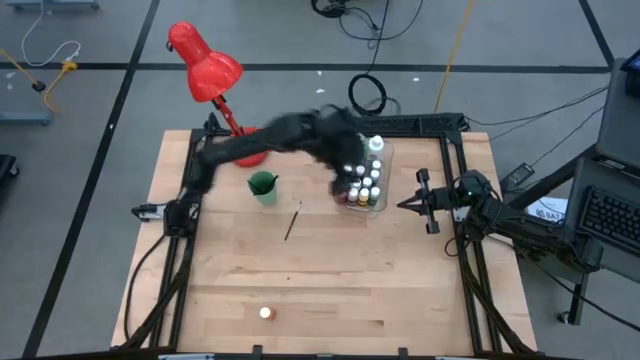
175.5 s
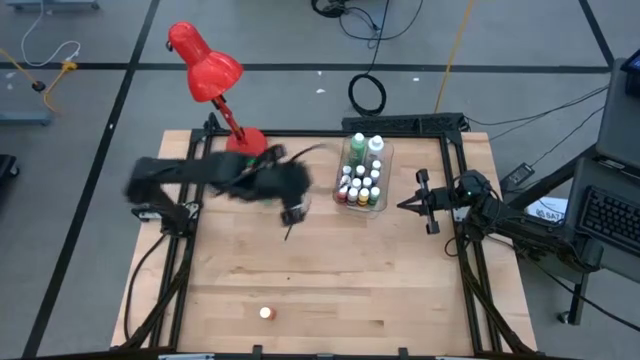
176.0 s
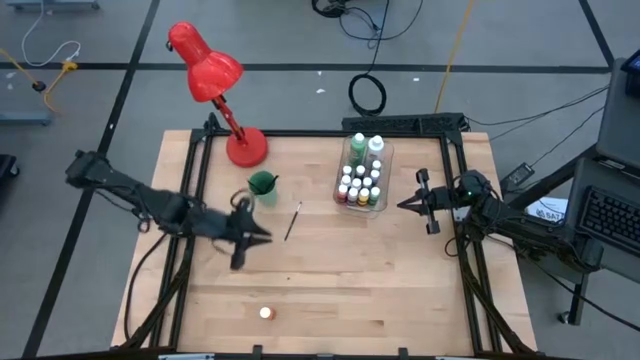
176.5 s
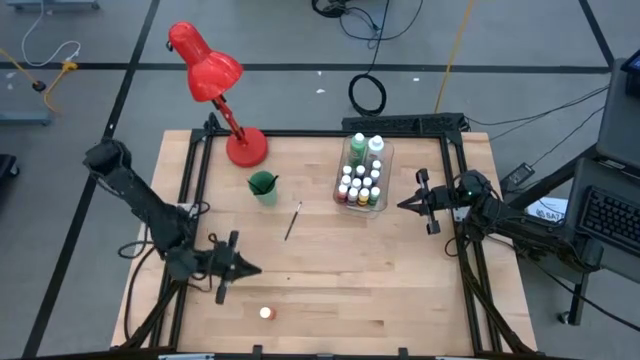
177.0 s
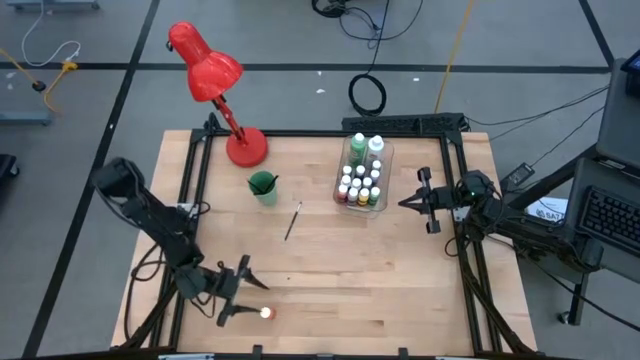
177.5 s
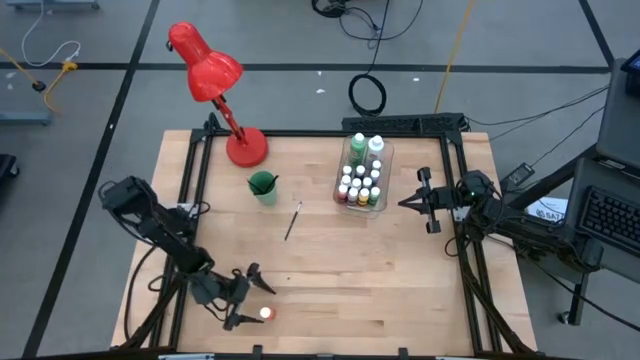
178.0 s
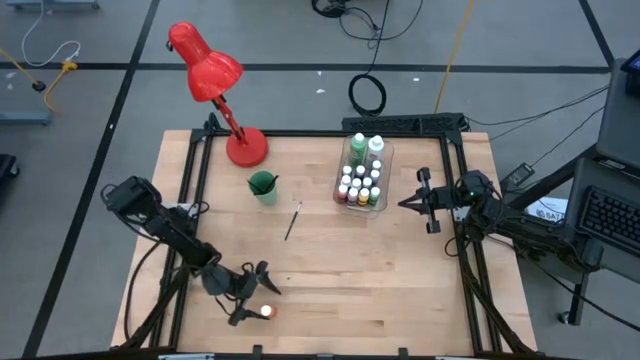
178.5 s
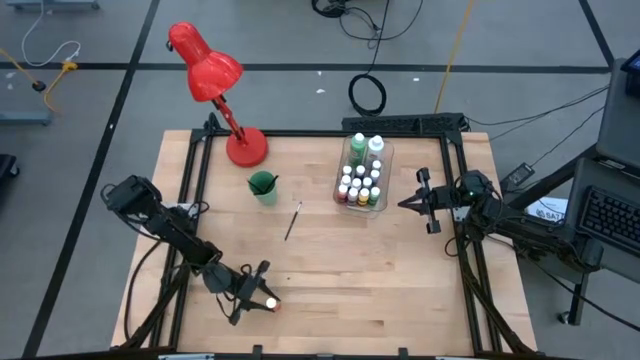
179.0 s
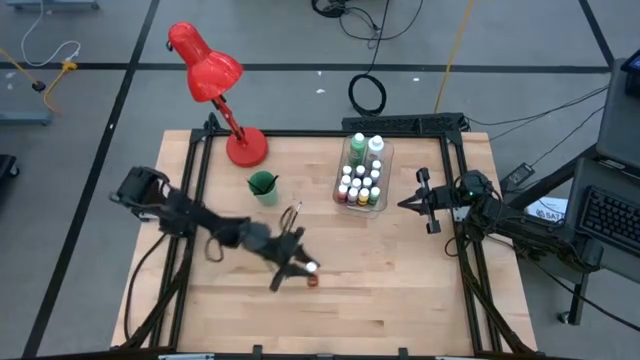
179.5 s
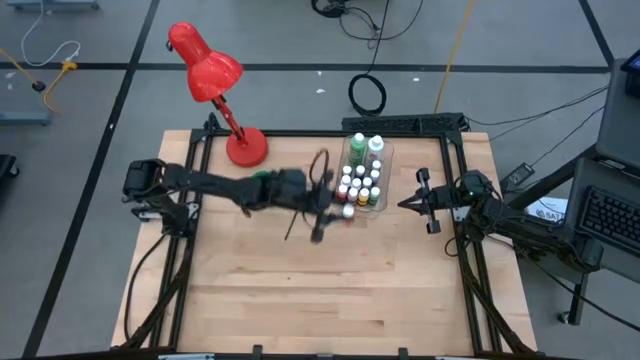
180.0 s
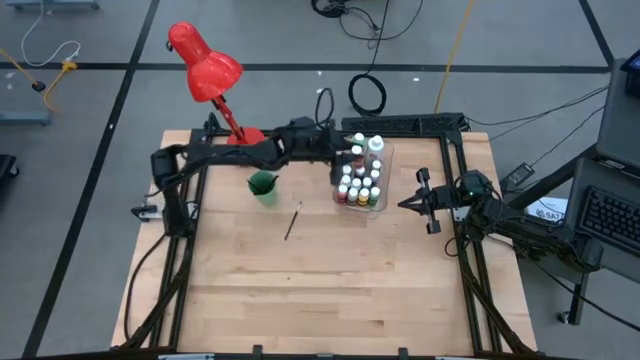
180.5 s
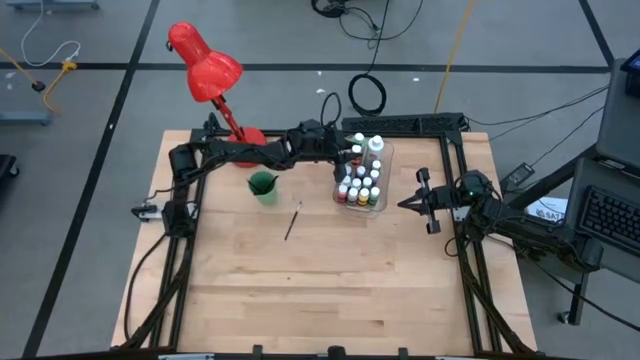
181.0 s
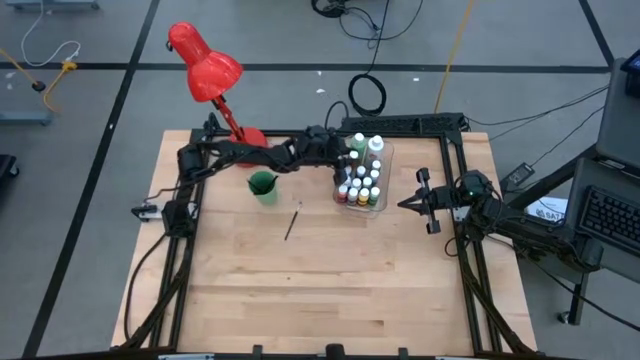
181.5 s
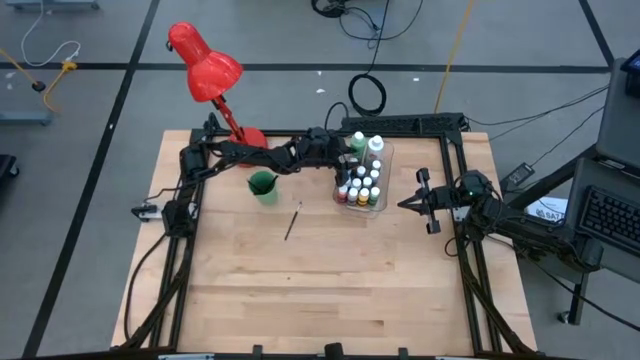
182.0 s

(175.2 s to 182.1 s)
Task: Pick & Place Paint Supplies
Put the small orange paint bottle into the transparent bin

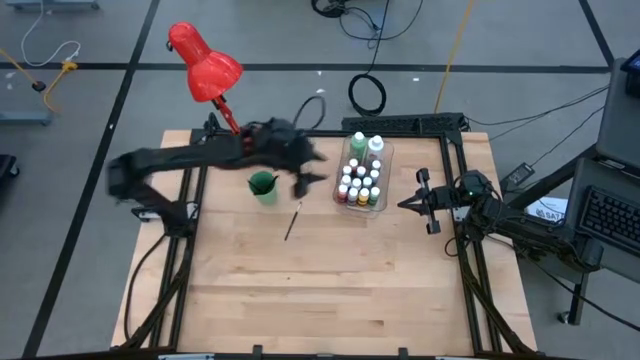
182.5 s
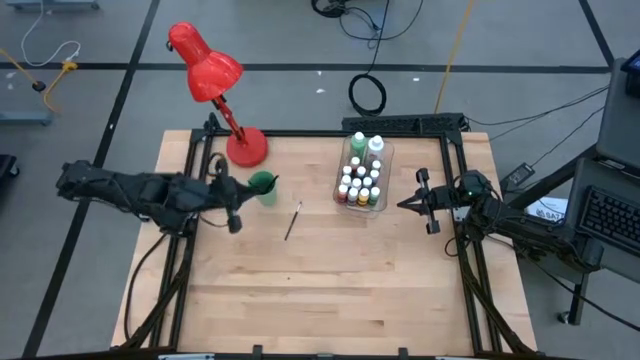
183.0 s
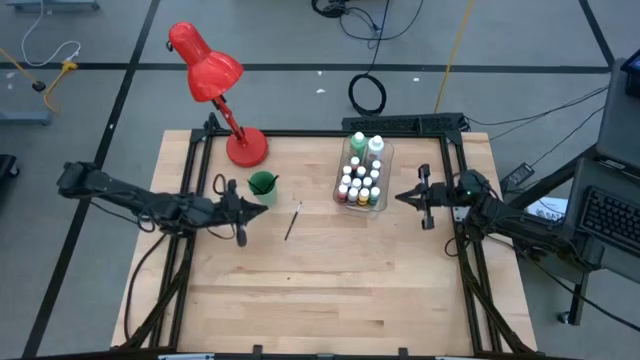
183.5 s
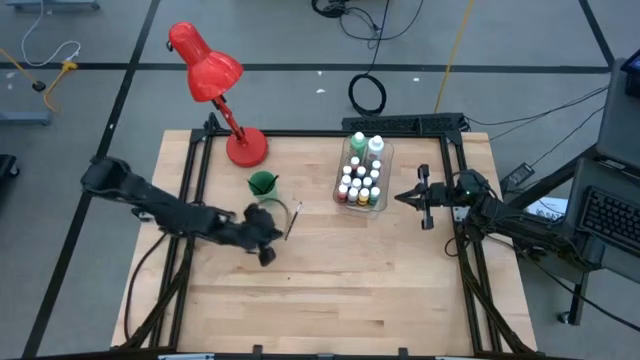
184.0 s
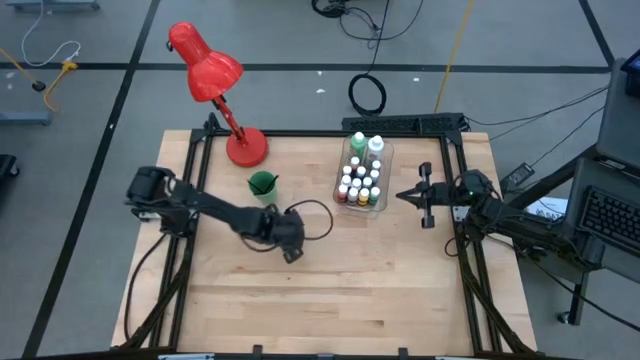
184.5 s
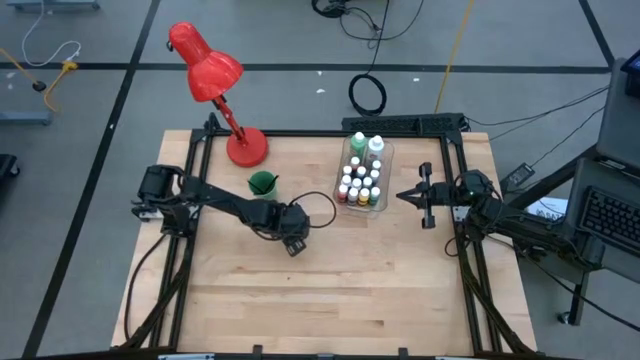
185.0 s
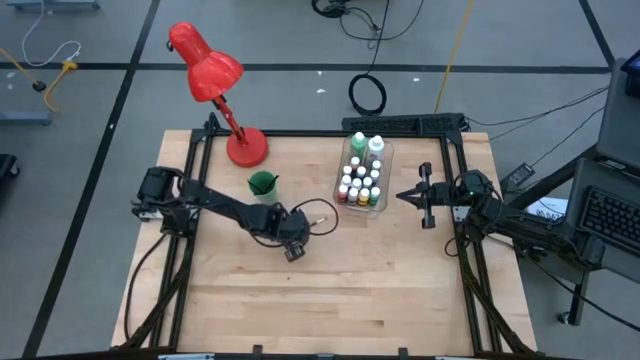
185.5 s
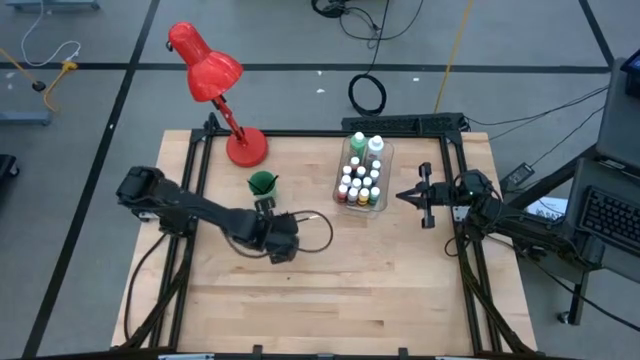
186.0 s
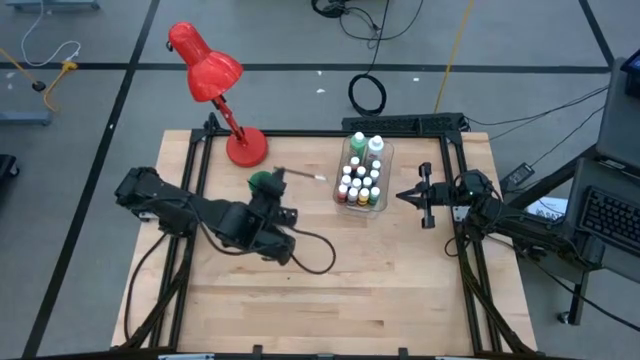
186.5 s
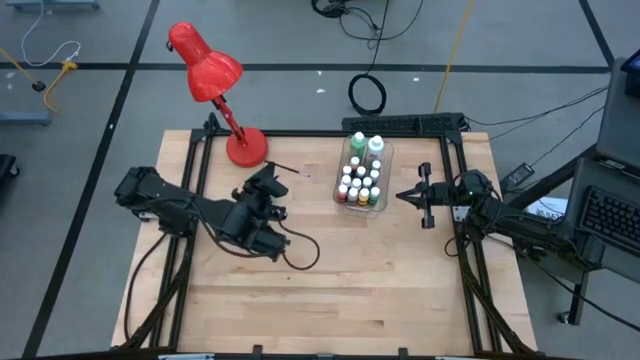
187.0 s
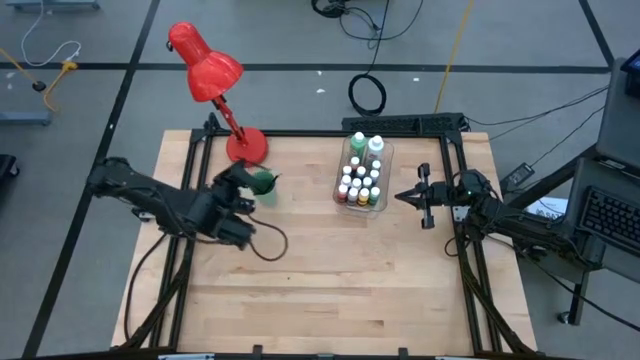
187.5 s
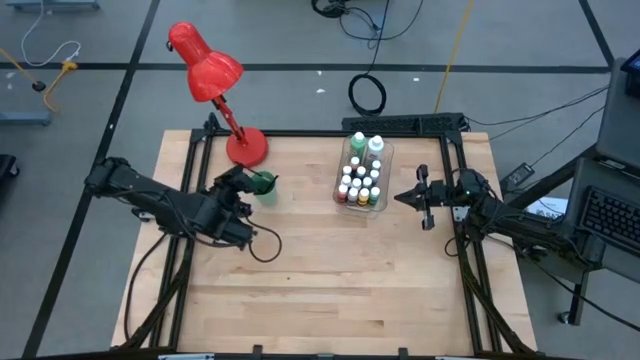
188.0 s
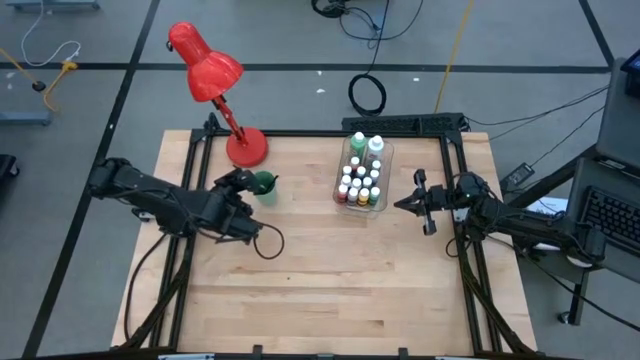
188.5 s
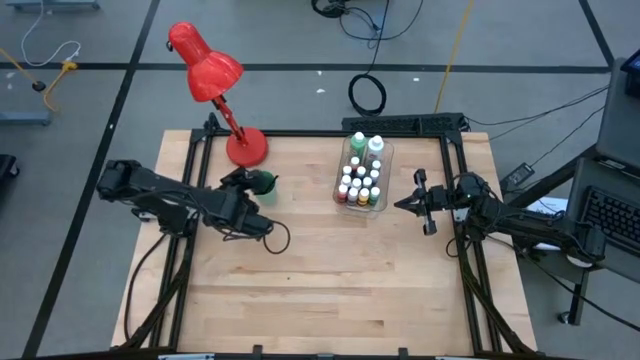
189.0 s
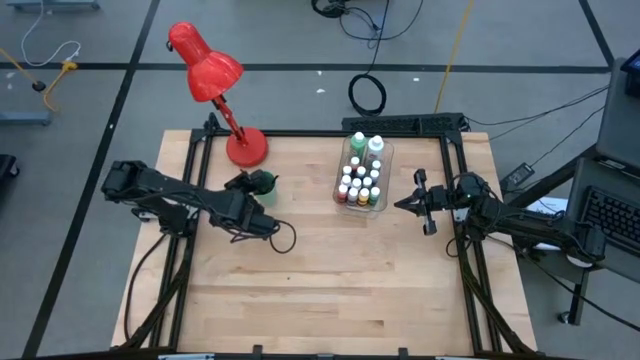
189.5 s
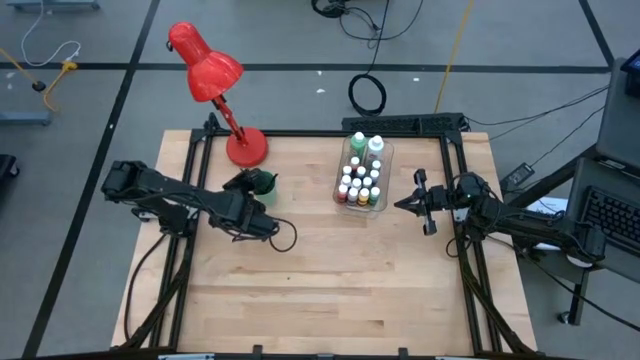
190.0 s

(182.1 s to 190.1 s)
Put the silver paintbrush into the green cup

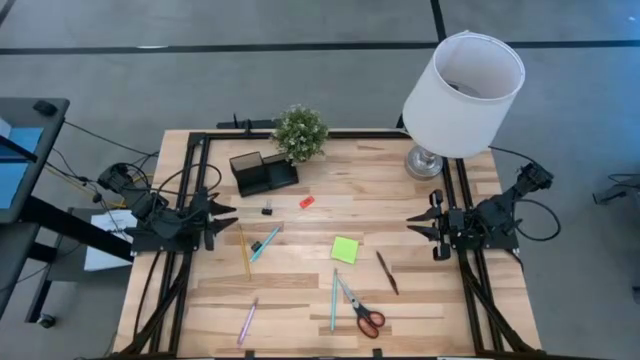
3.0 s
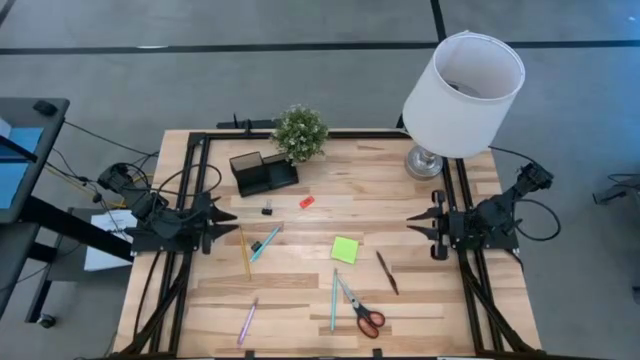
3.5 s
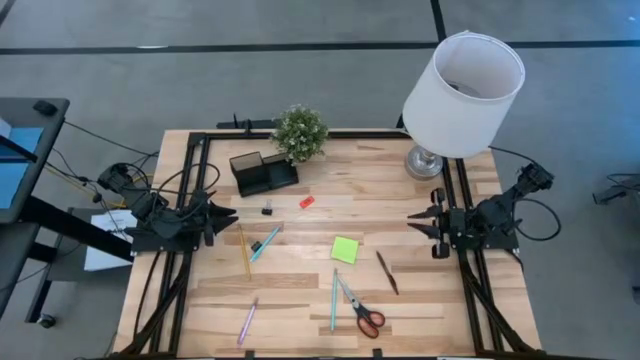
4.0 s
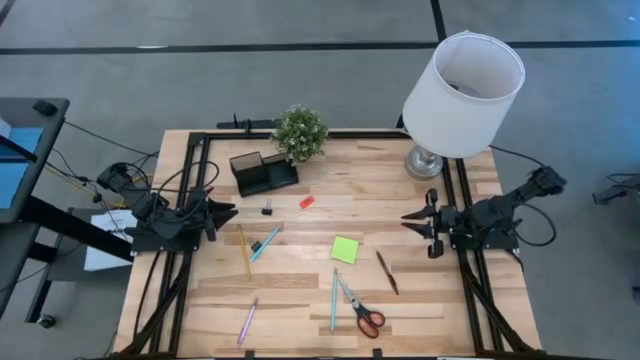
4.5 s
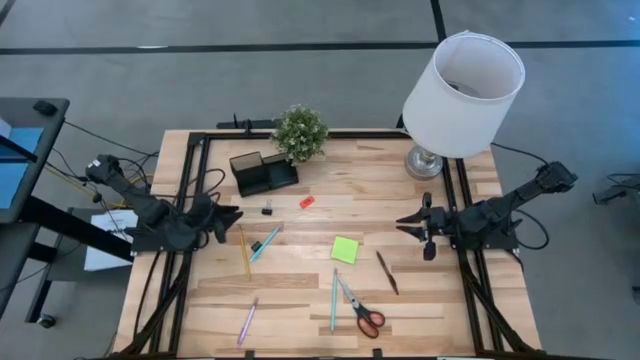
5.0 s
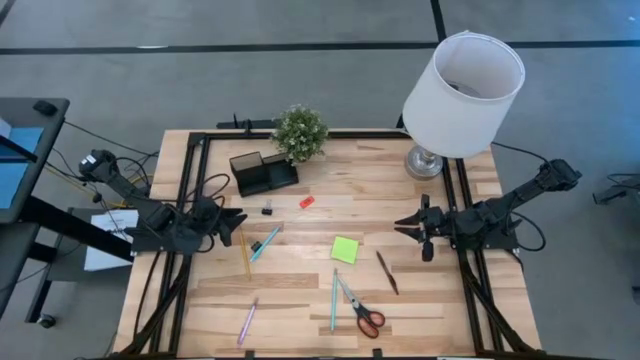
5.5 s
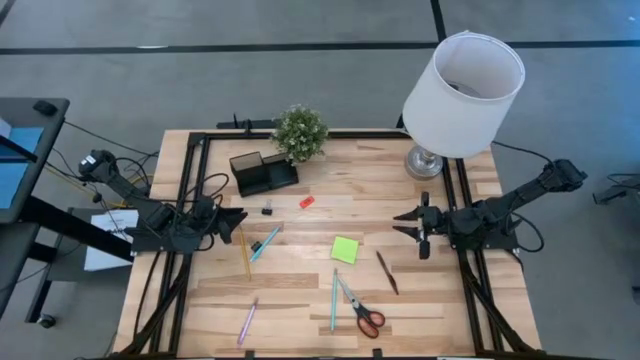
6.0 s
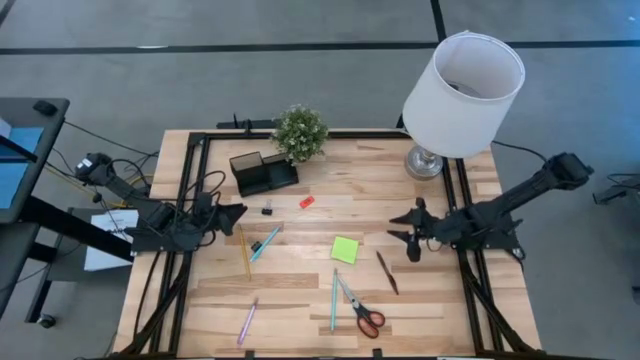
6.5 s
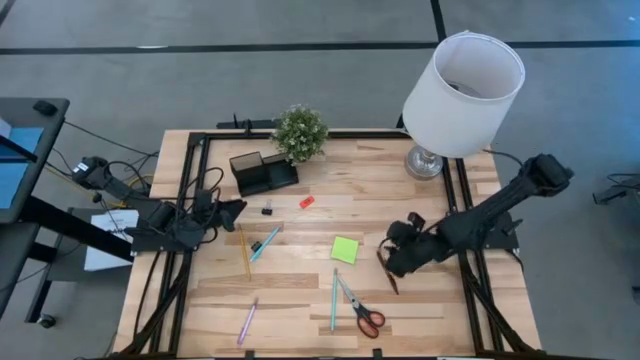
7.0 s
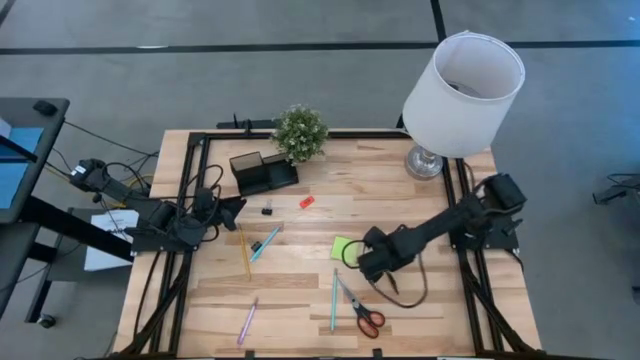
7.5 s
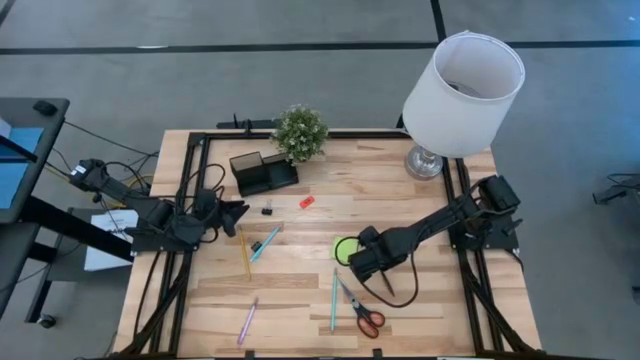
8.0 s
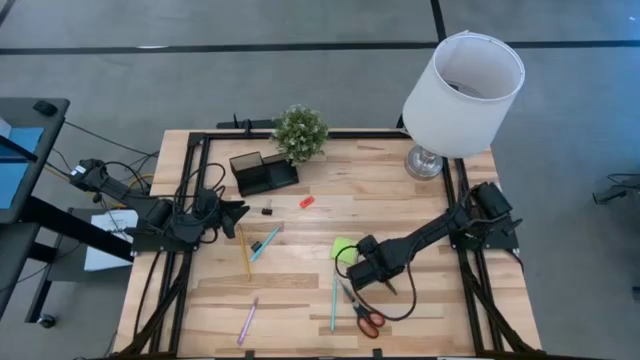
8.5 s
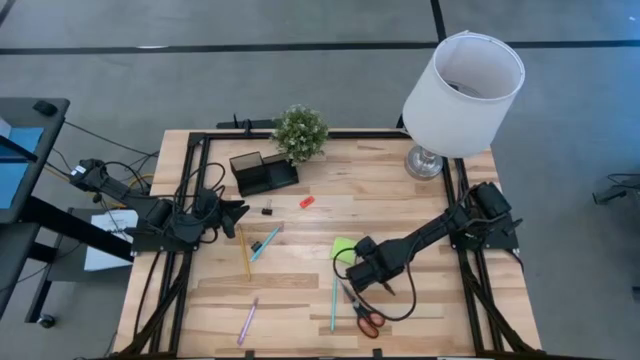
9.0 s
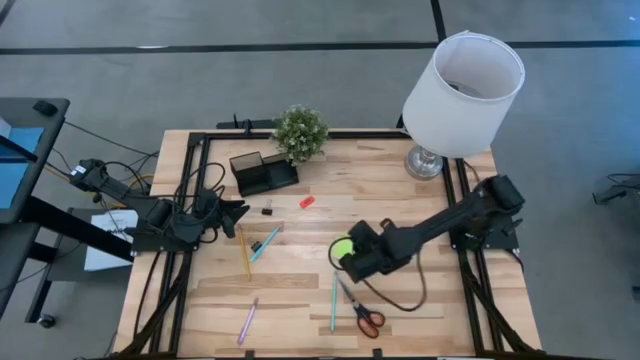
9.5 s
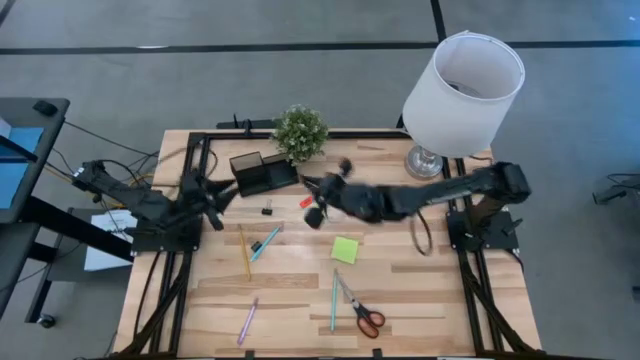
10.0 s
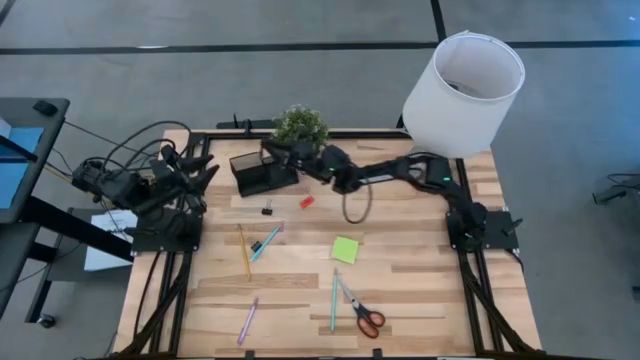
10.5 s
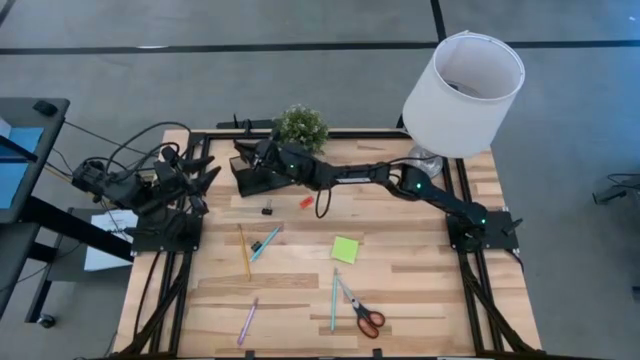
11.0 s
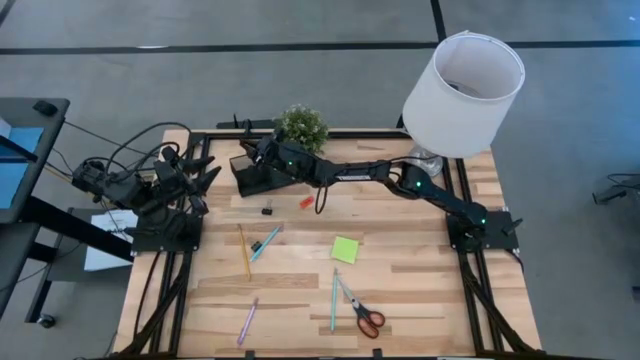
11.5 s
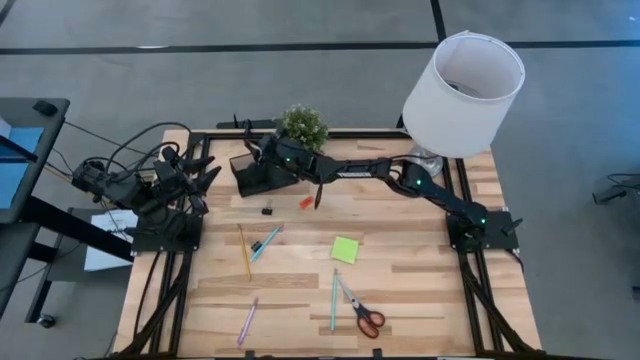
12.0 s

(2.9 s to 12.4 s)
Task: Pick and place office supplies into organizer
Put the brown pen into the black organizer
